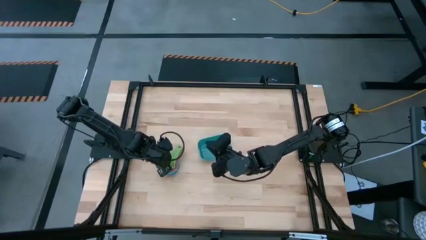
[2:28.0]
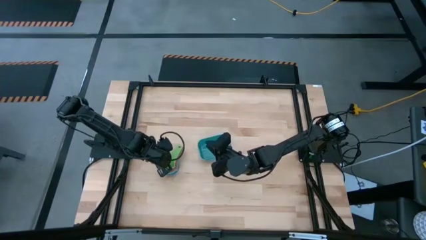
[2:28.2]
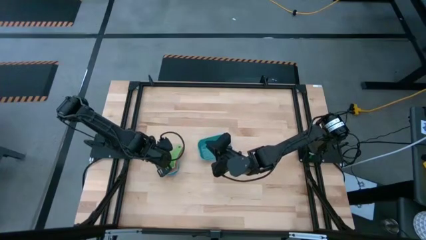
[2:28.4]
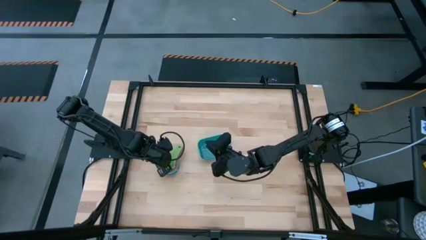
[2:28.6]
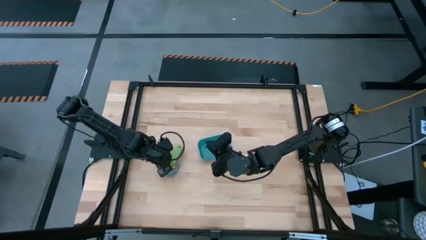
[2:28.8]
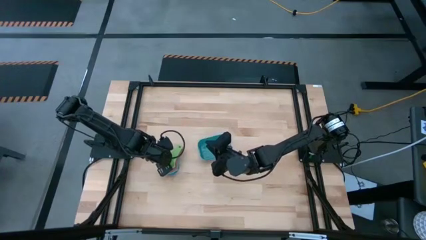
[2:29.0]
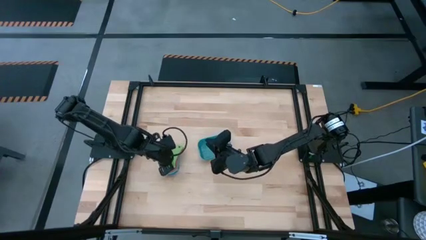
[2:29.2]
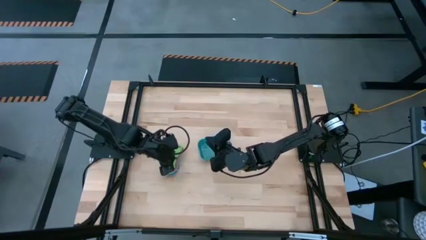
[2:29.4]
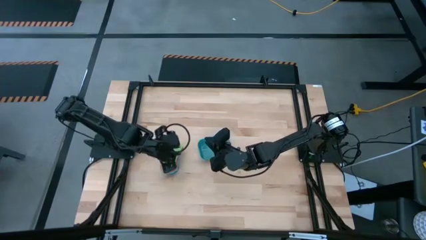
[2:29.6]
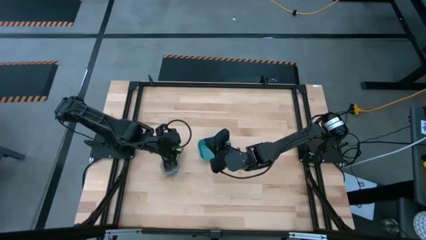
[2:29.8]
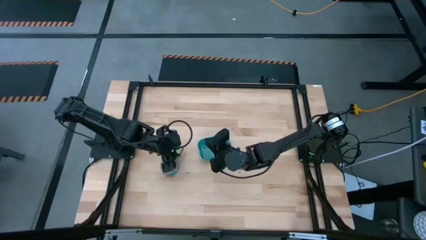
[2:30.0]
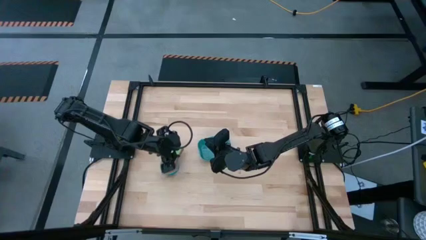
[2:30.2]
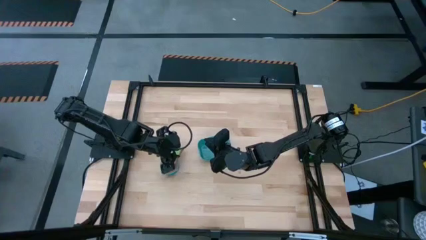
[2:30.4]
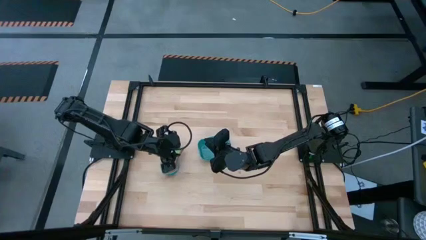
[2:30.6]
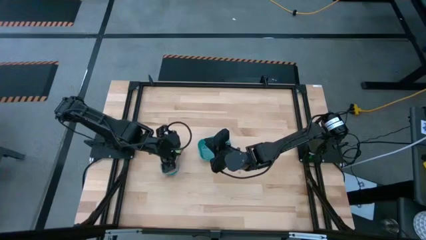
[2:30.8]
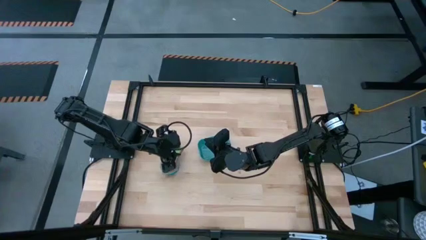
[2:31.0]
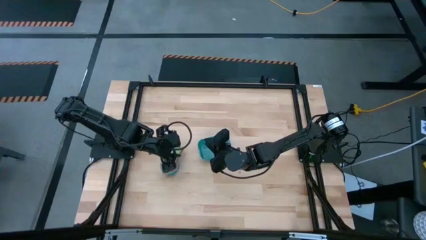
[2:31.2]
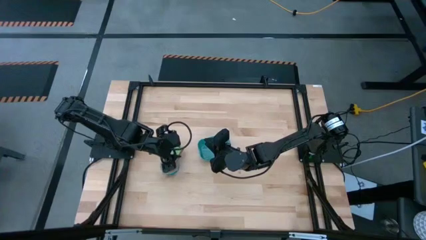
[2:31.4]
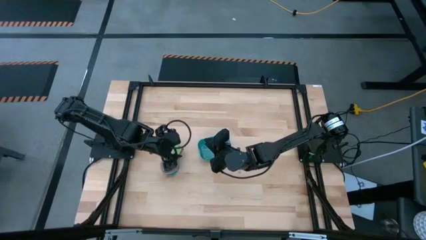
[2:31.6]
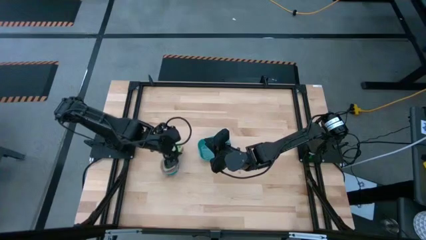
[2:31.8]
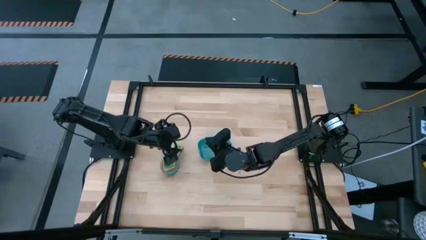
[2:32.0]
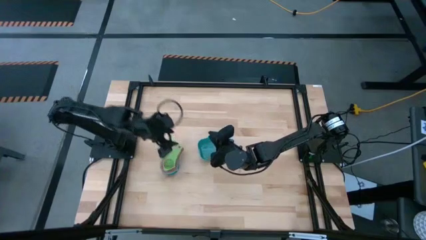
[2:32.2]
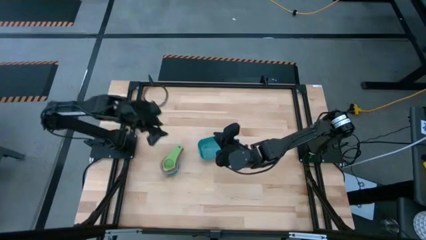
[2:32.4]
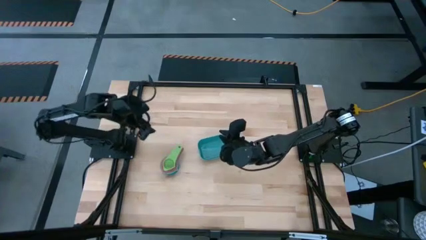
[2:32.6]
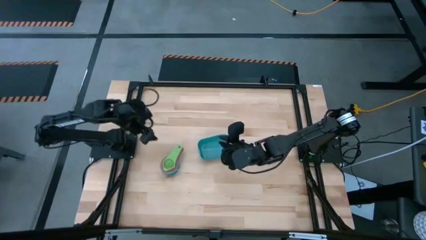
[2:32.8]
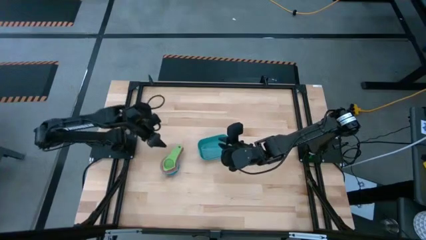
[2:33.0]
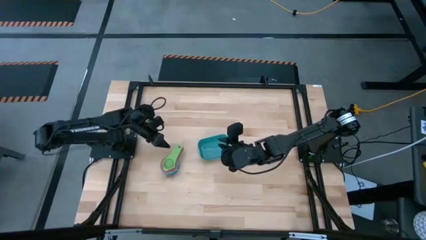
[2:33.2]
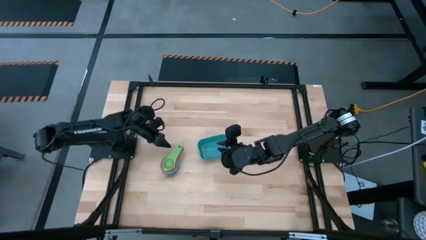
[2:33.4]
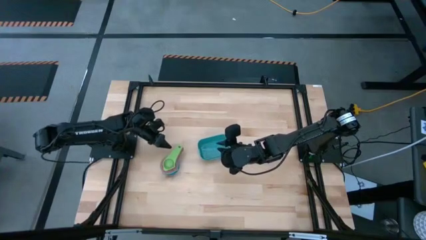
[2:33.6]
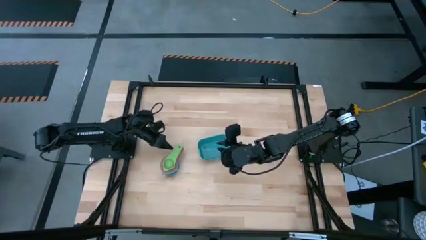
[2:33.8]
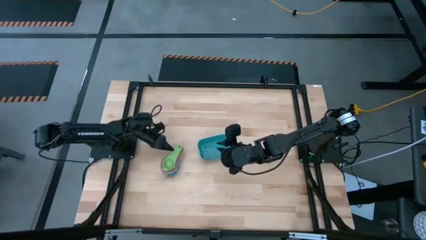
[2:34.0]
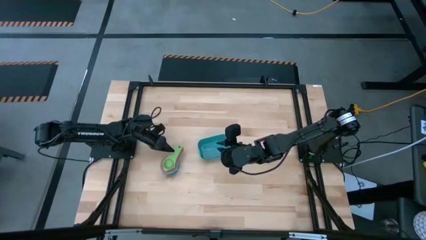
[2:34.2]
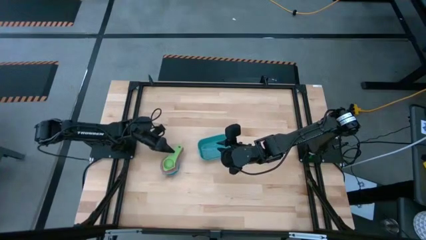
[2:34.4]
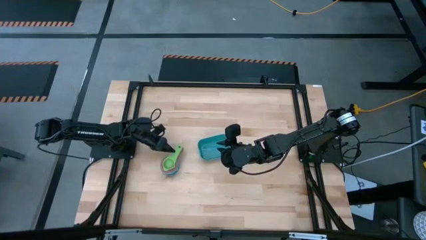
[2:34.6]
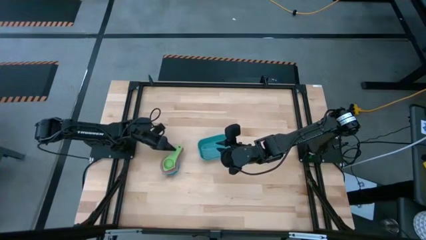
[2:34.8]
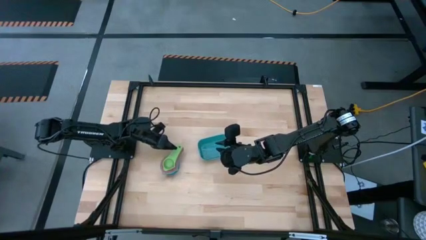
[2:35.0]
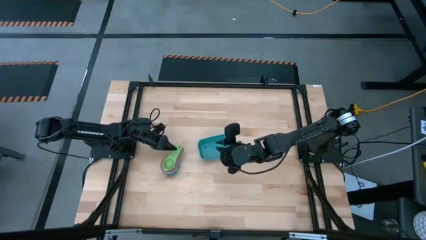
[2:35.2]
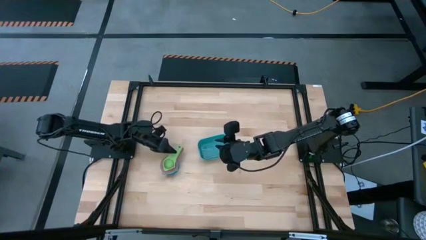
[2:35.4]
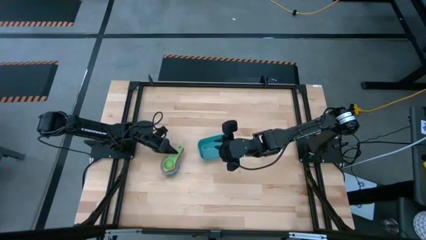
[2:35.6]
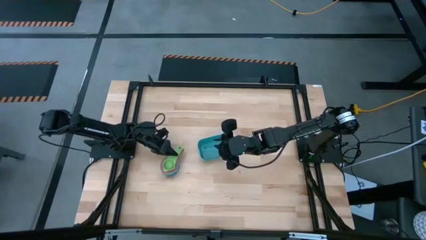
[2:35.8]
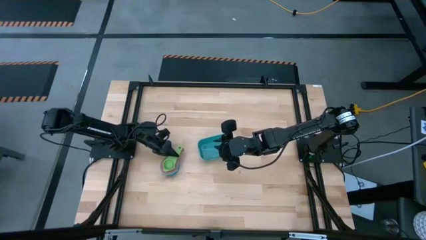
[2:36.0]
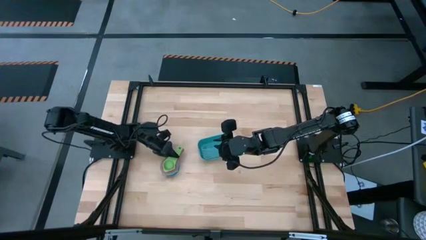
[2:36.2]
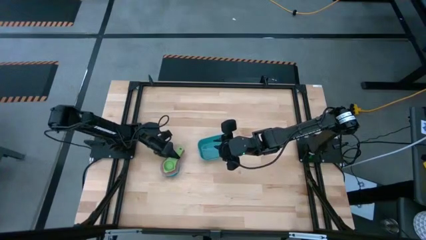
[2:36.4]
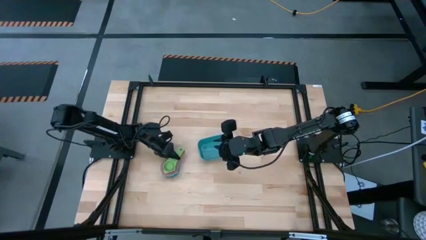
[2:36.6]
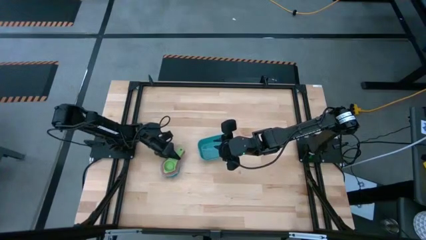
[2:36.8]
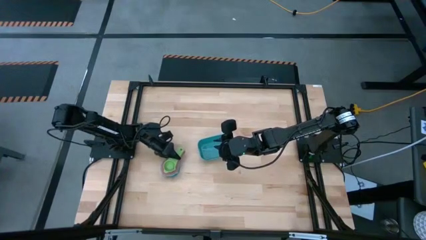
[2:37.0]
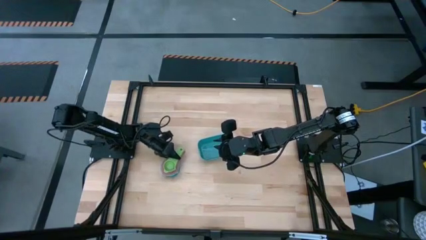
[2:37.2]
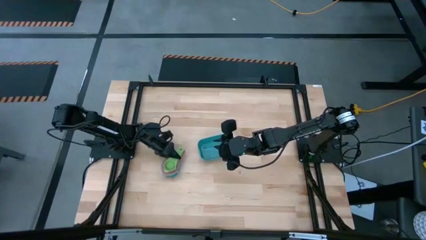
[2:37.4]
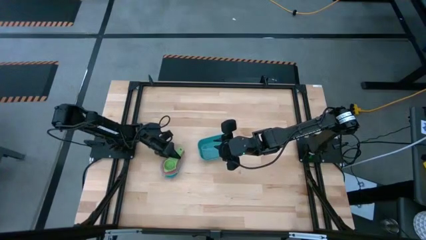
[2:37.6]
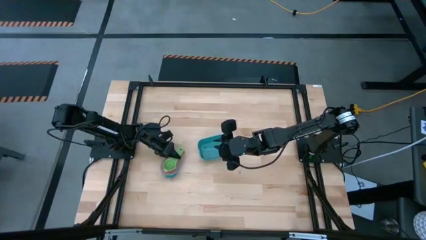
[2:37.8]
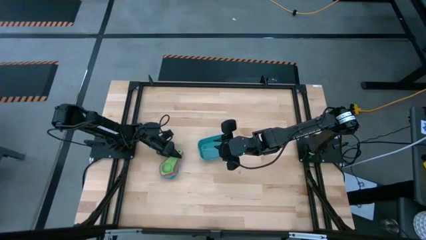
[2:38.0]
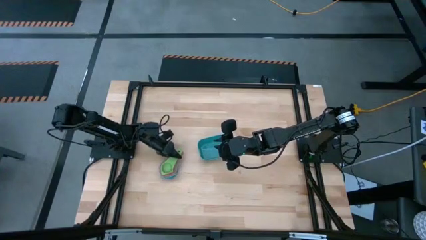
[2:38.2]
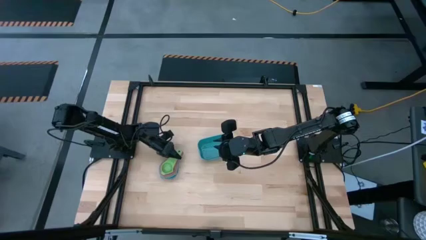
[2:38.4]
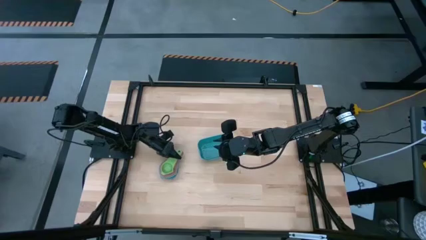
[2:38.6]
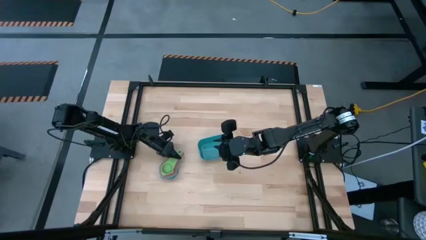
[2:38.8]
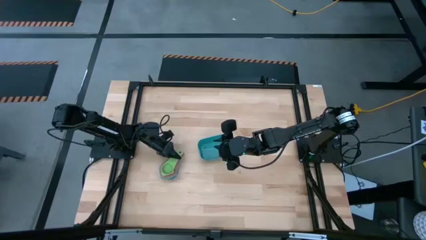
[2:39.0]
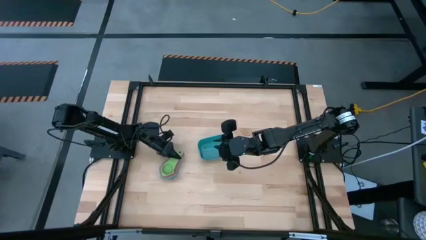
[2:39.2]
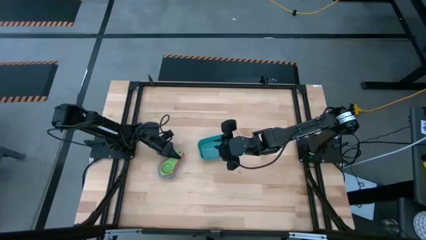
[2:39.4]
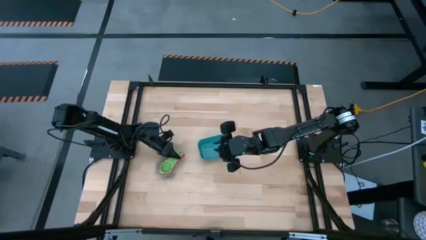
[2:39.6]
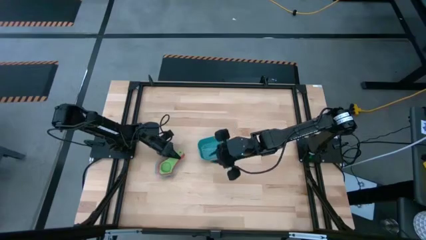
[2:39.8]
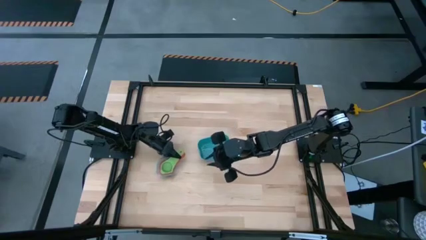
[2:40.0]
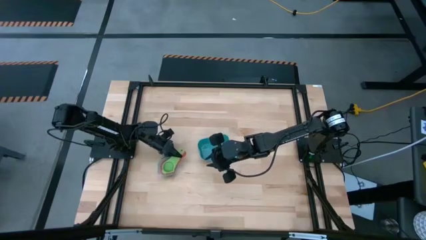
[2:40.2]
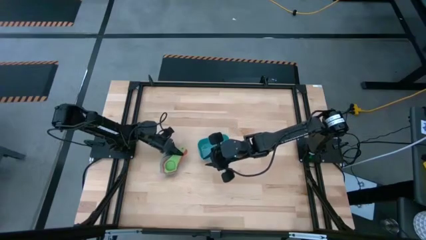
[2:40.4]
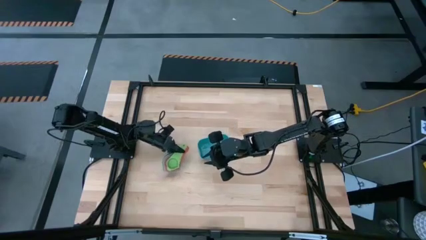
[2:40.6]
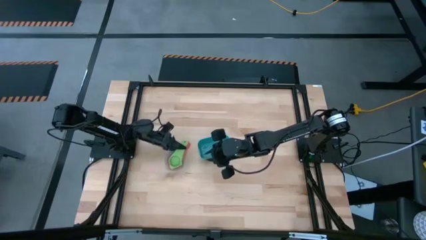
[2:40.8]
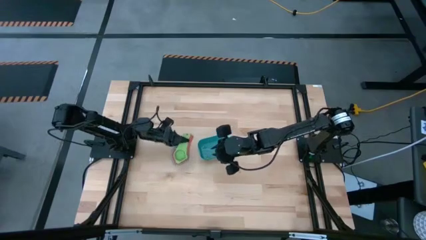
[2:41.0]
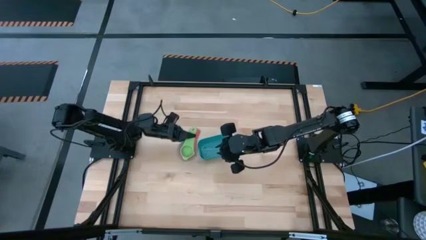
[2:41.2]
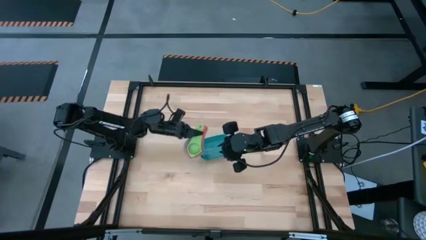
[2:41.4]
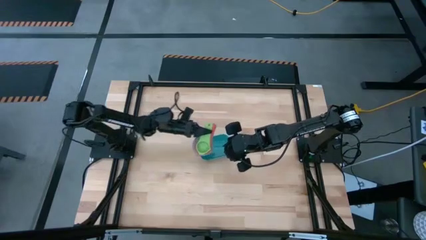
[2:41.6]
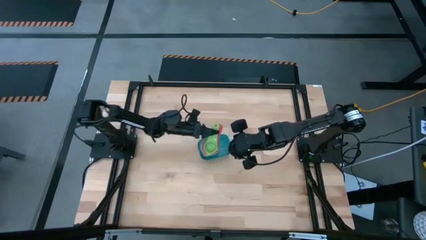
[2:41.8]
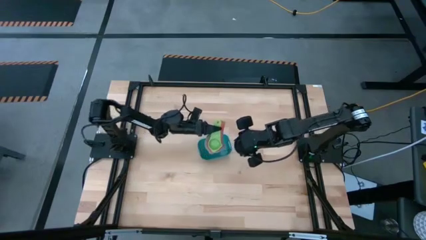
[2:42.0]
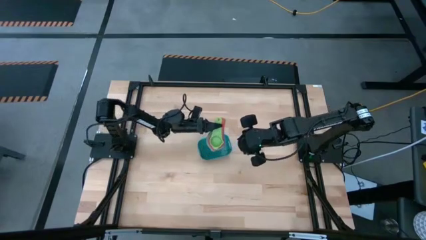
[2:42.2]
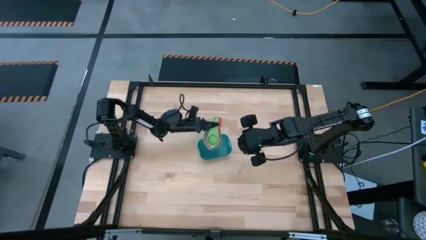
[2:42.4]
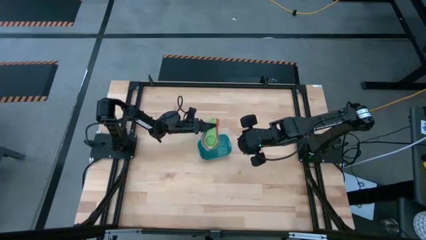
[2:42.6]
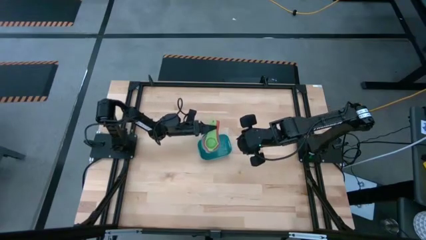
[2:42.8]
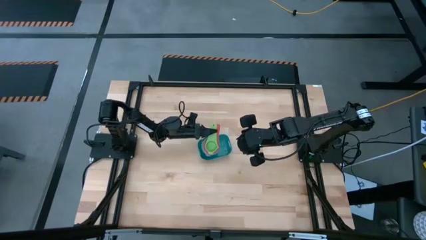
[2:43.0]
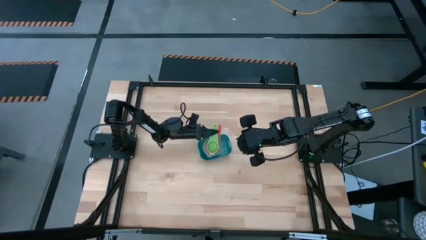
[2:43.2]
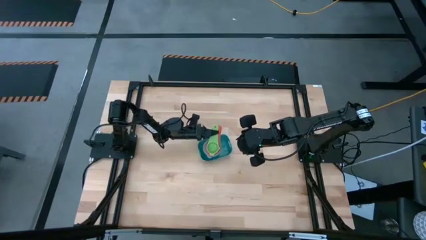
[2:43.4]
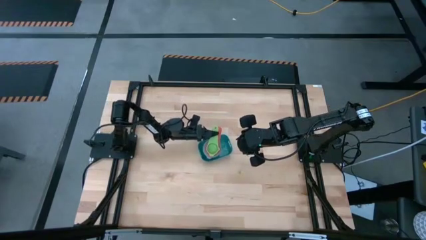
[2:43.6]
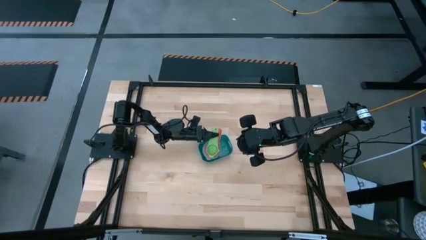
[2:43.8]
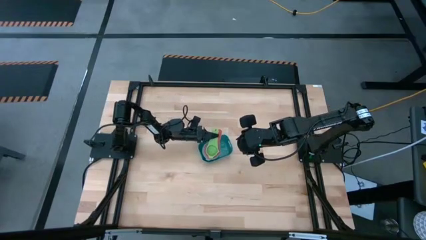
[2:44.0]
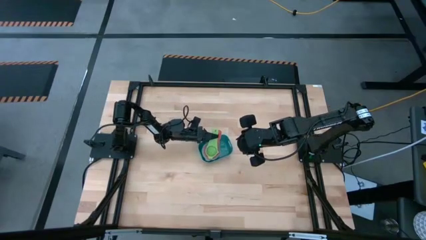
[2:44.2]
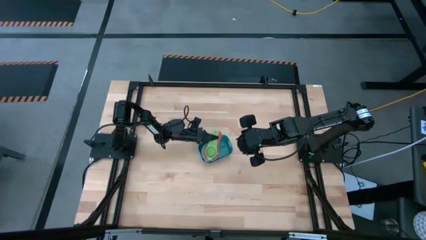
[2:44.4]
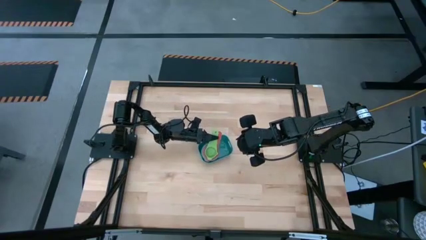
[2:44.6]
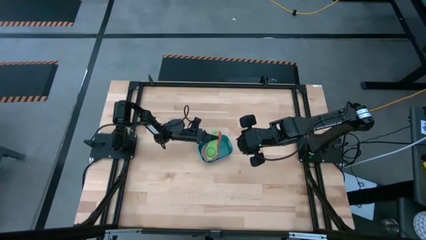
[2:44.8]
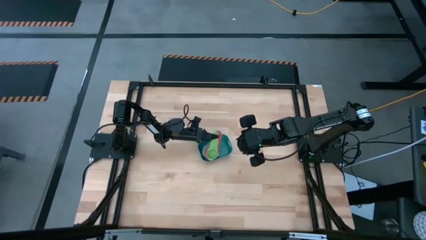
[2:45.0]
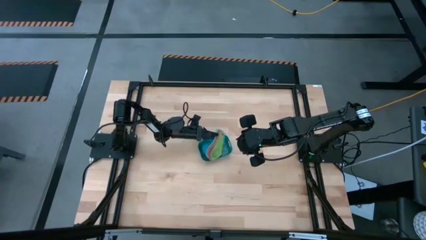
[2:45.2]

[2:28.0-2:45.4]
Task: Nest measuring cups in basket
Put the stacked measuring cups into the green bin
